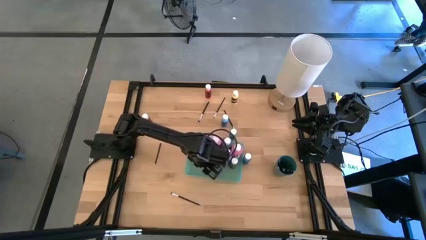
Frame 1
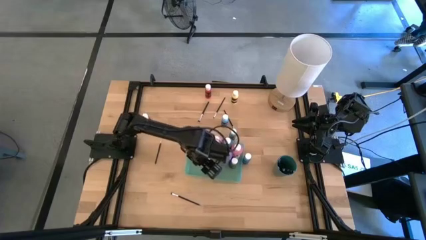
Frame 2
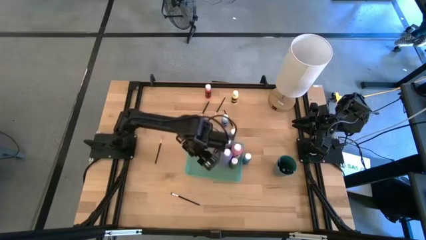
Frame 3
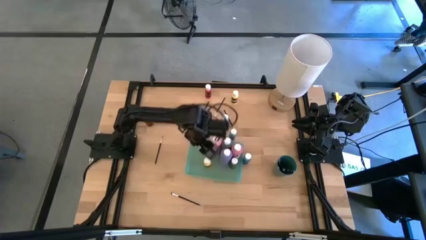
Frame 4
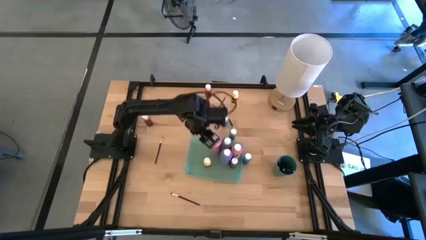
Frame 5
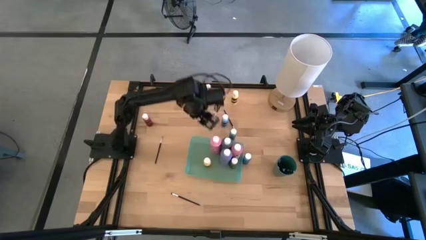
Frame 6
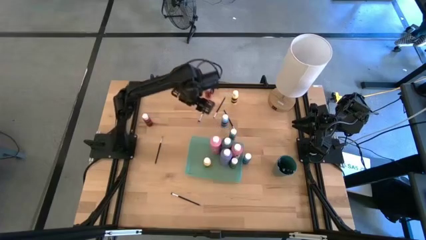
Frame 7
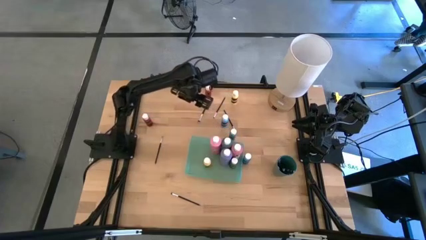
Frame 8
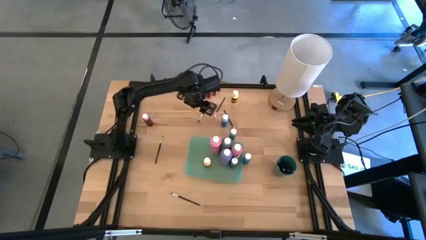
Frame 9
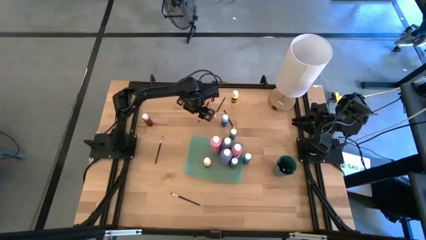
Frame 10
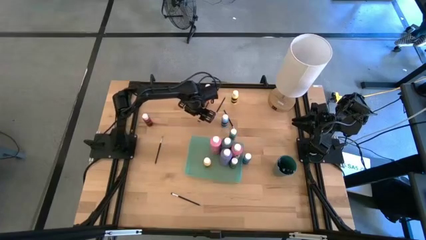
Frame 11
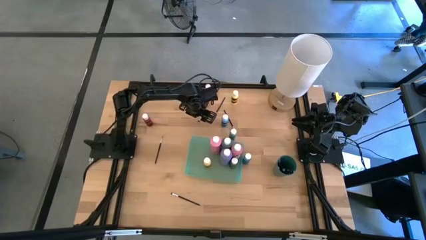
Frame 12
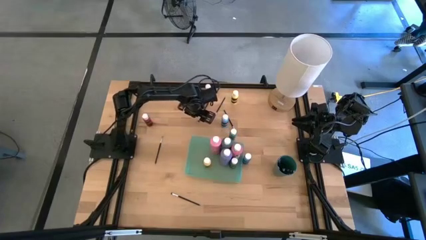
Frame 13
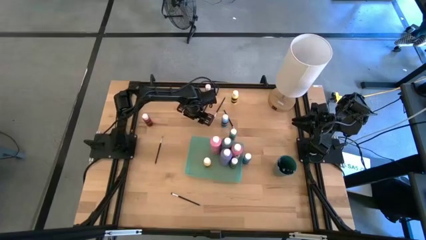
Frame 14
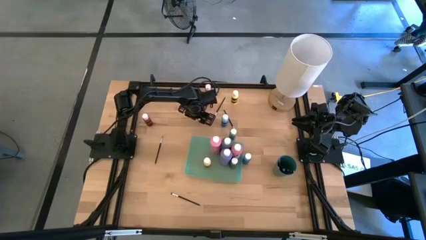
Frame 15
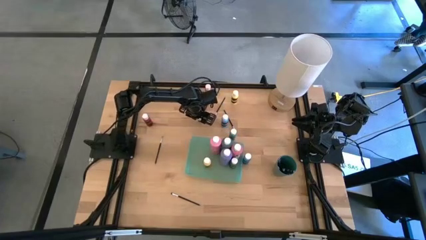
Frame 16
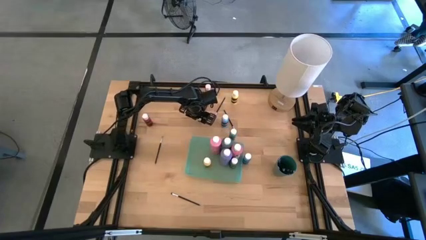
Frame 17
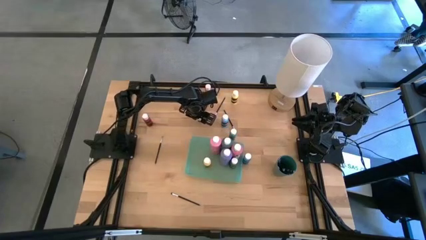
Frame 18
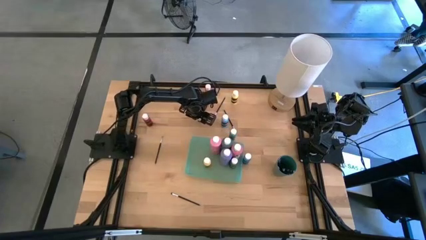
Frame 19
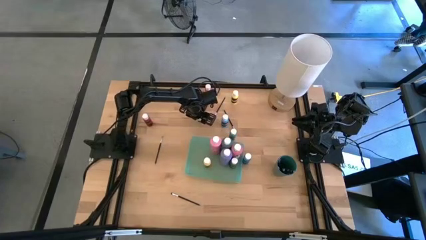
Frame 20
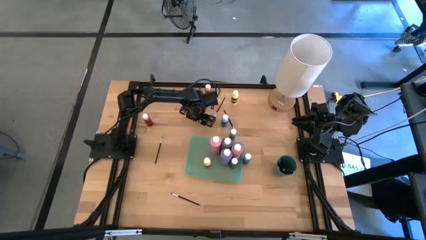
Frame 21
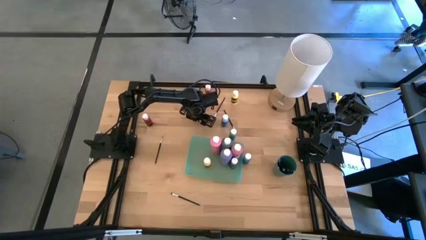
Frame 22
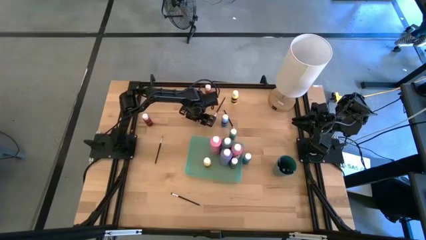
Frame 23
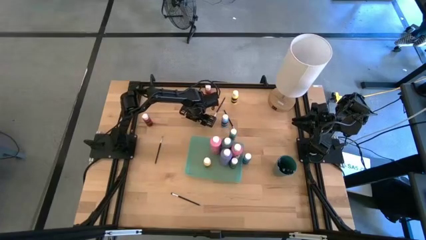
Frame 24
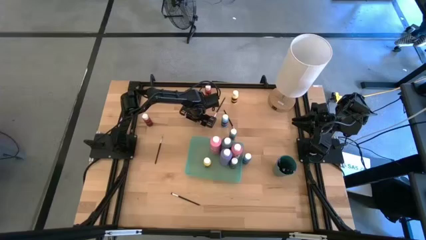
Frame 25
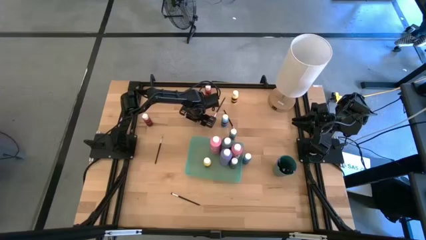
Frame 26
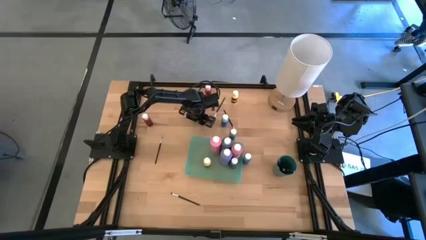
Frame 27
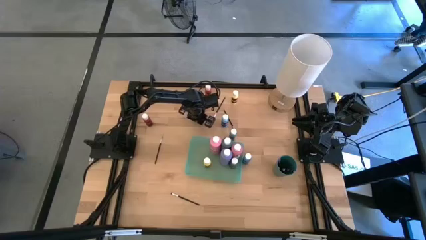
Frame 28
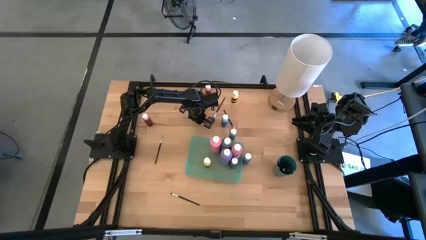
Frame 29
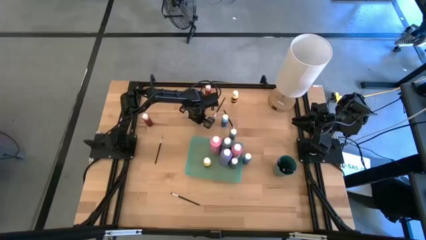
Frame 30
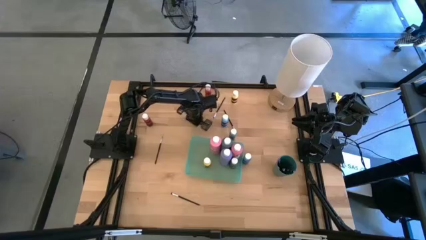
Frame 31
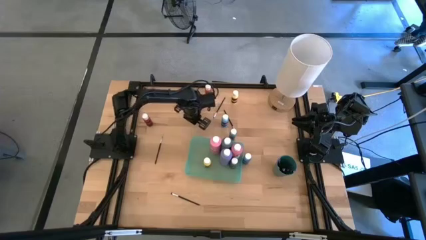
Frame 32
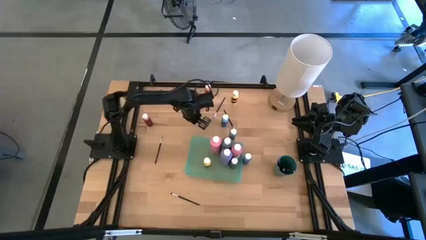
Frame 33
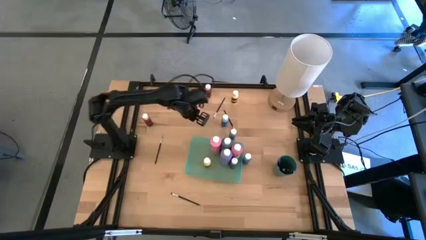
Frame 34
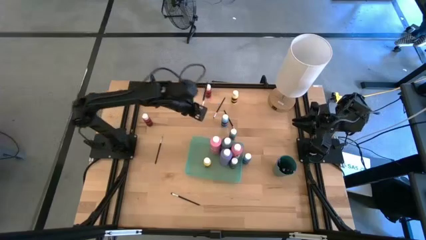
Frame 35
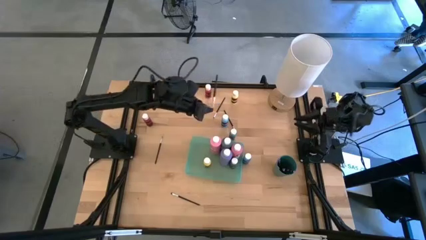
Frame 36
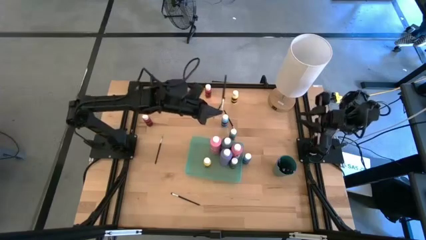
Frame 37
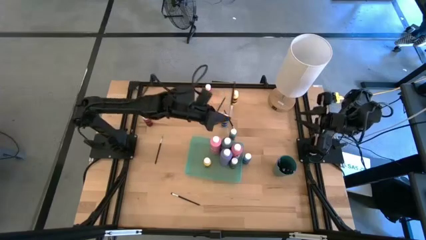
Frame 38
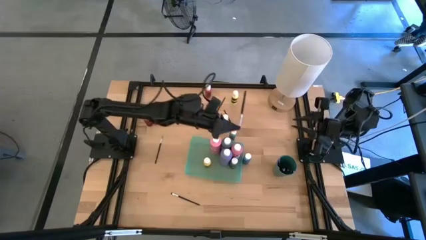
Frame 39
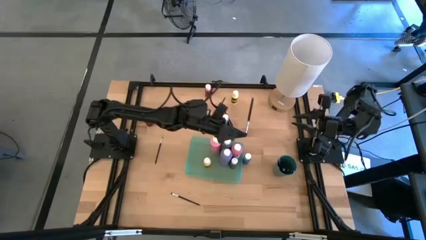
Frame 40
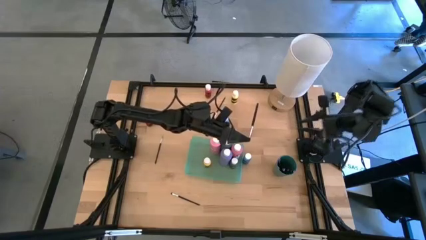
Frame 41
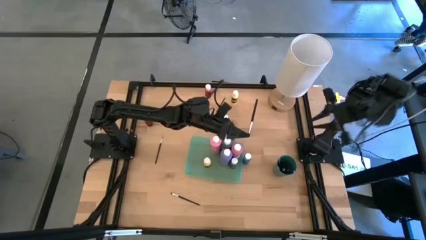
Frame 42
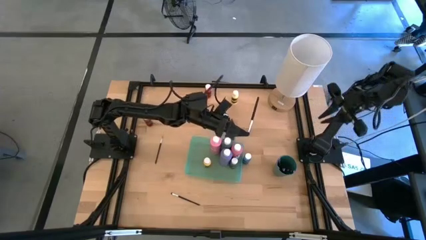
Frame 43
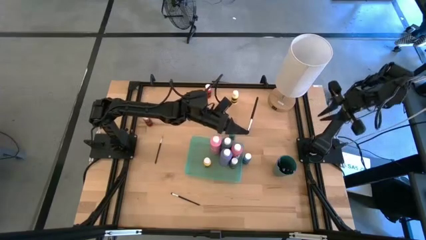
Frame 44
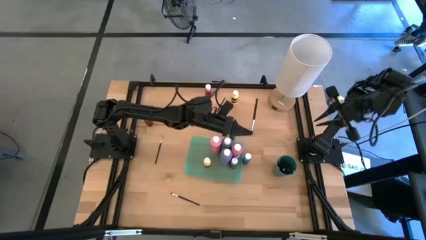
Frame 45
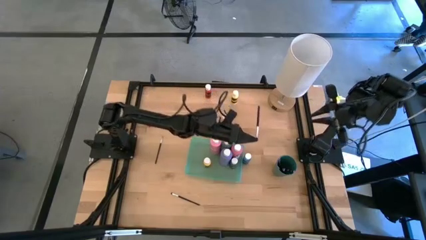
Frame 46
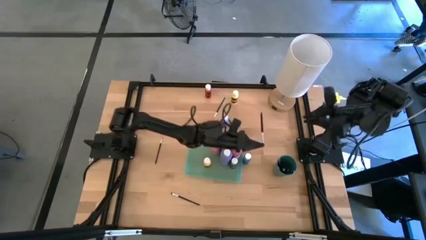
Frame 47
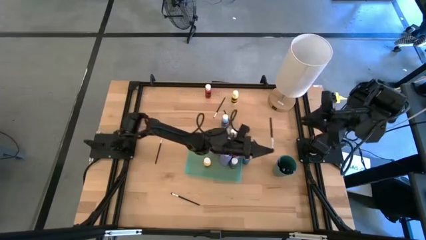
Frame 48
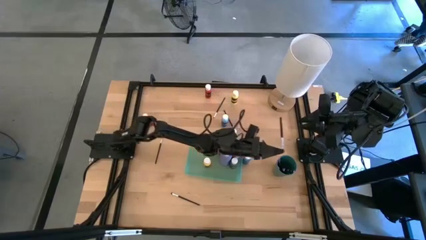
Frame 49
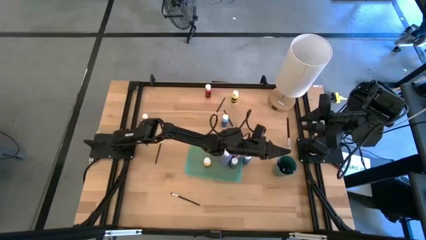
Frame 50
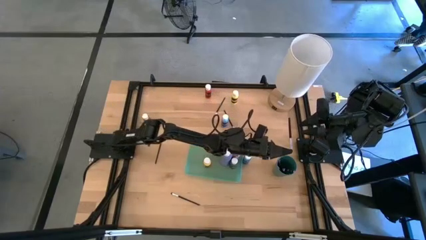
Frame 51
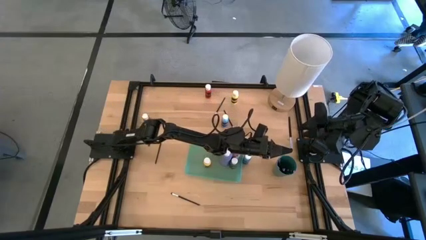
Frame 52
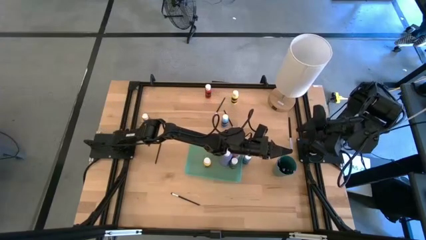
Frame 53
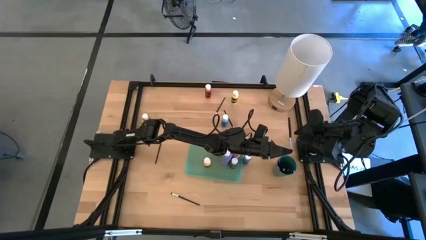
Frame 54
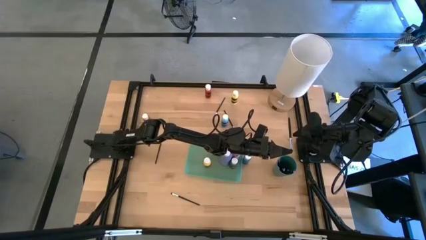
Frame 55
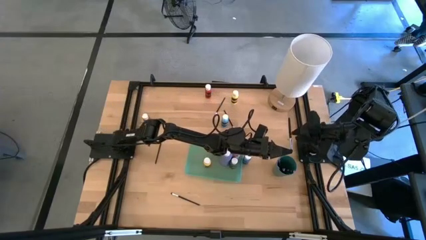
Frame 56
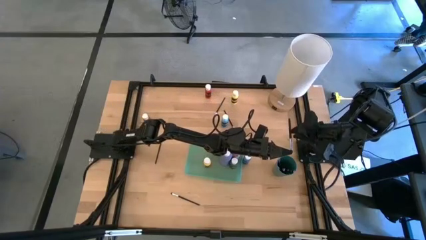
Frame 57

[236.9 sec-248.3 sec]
Task: Pick & Place Paint Supplies
Put the black eyeshadow brush into the green cup
